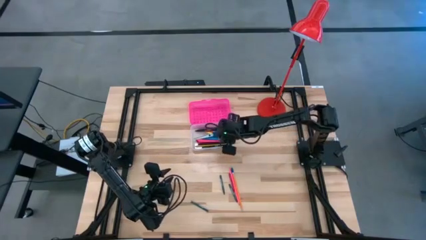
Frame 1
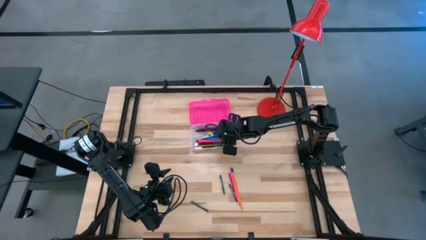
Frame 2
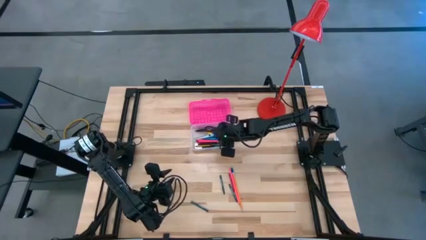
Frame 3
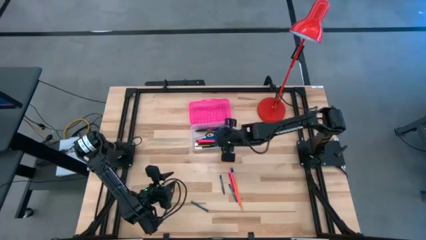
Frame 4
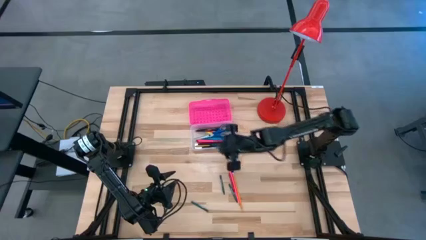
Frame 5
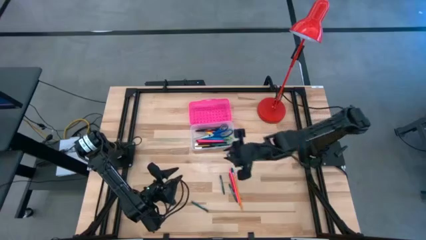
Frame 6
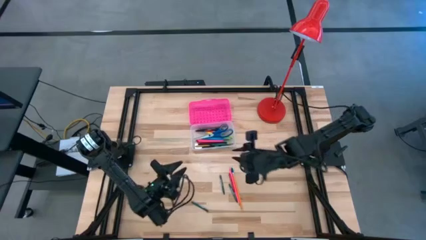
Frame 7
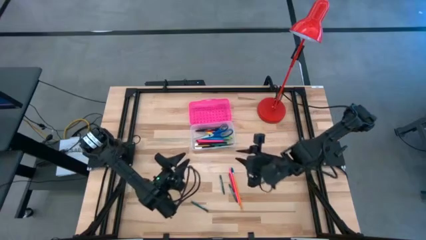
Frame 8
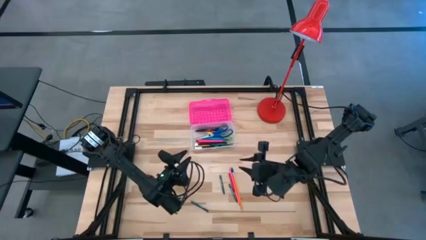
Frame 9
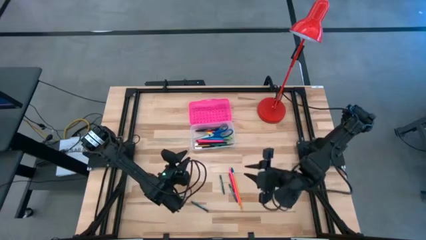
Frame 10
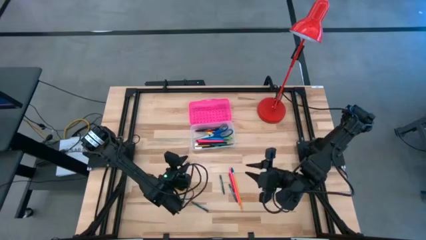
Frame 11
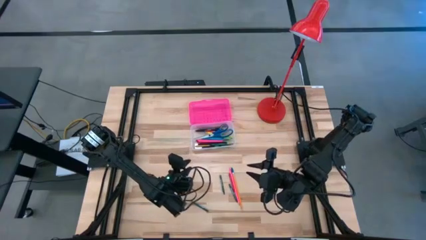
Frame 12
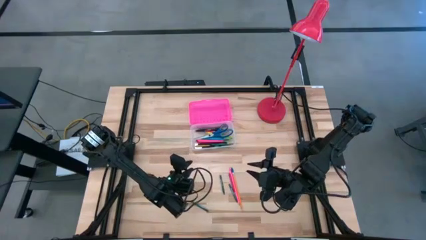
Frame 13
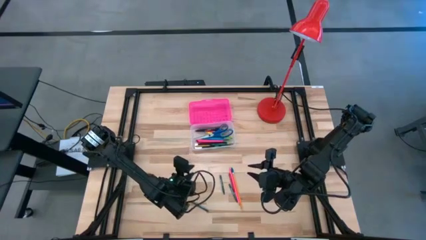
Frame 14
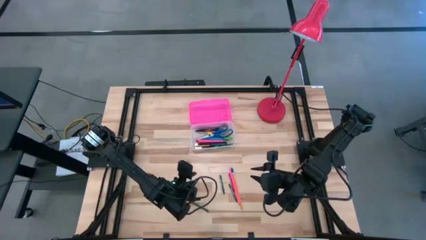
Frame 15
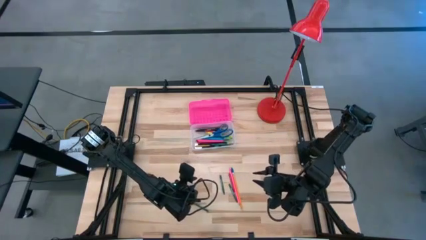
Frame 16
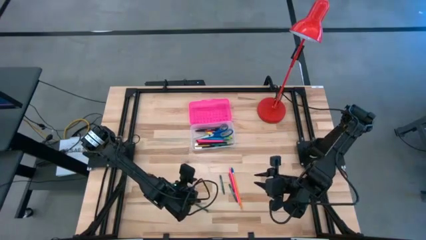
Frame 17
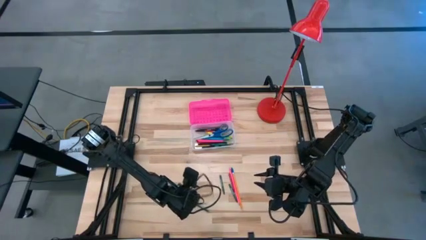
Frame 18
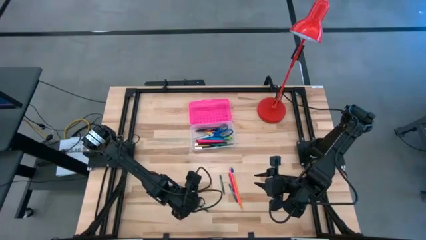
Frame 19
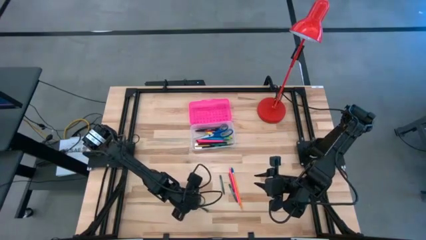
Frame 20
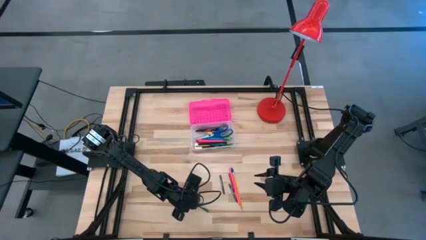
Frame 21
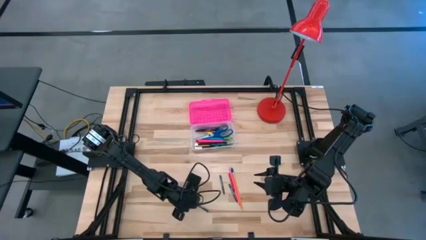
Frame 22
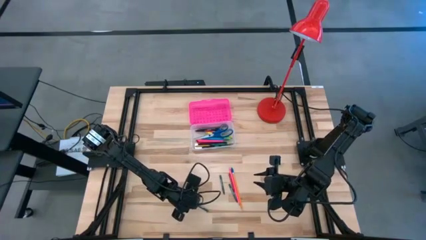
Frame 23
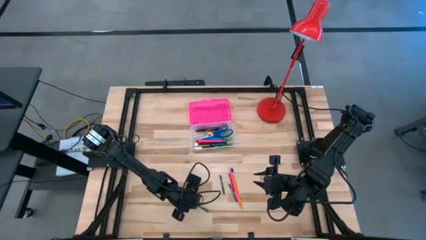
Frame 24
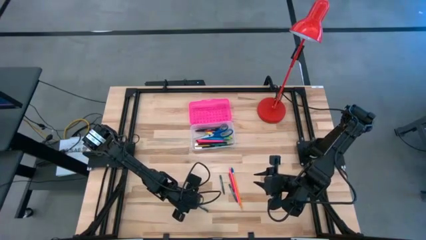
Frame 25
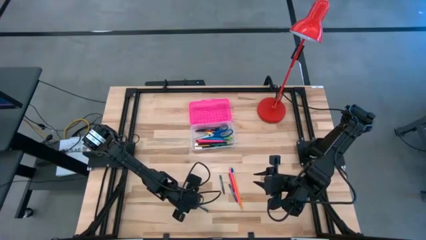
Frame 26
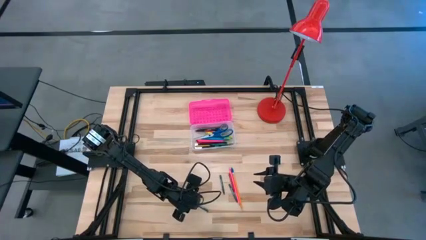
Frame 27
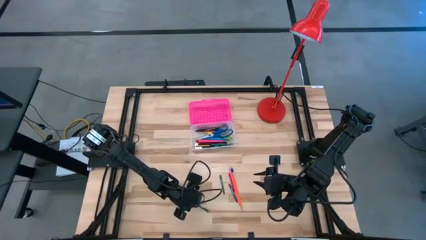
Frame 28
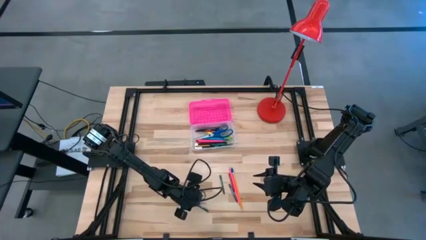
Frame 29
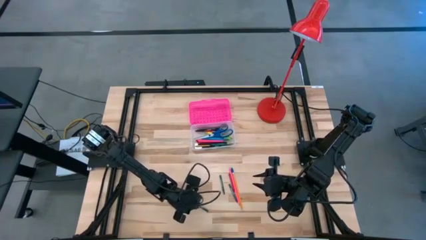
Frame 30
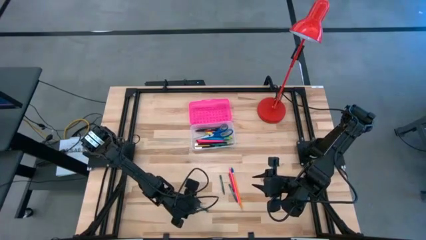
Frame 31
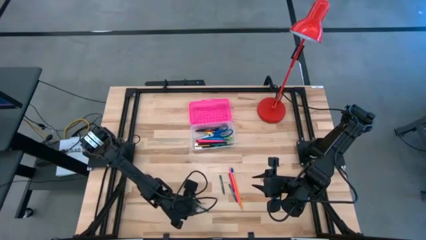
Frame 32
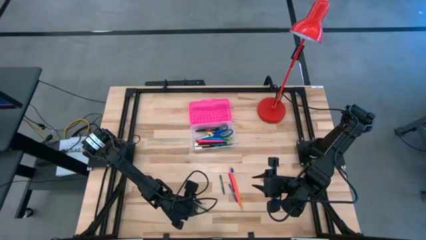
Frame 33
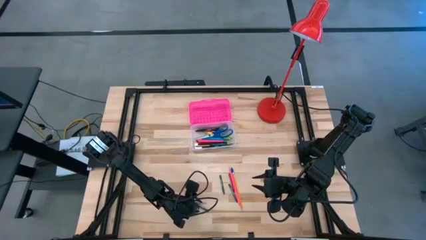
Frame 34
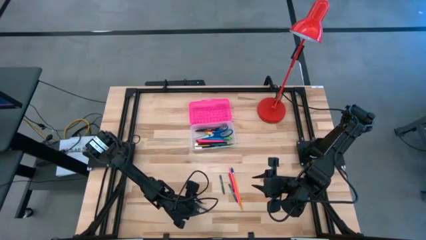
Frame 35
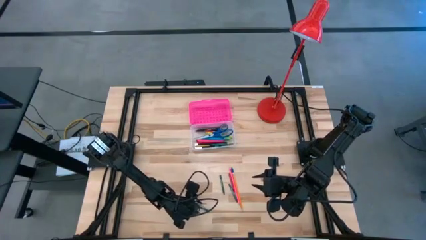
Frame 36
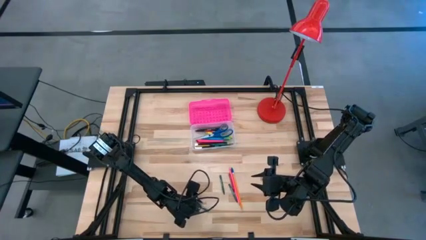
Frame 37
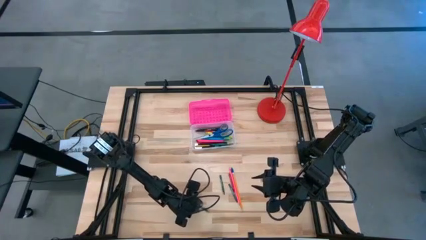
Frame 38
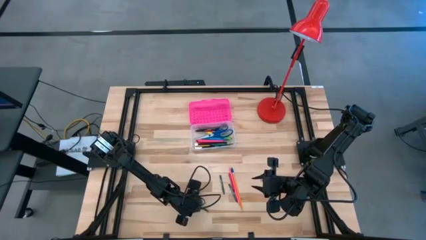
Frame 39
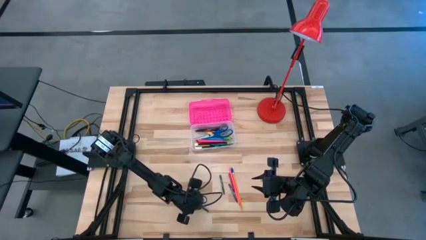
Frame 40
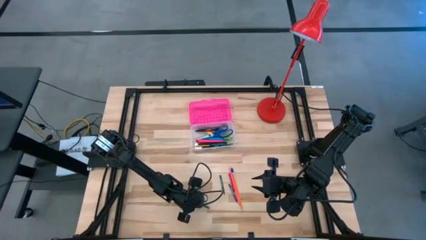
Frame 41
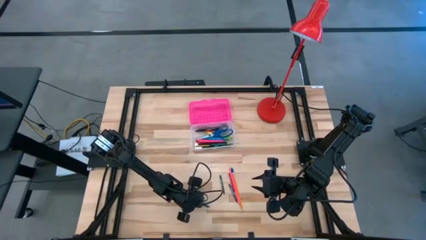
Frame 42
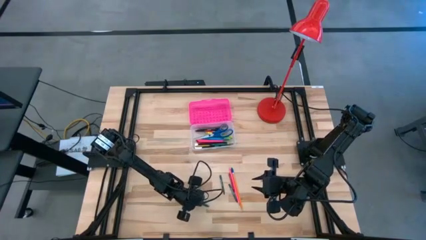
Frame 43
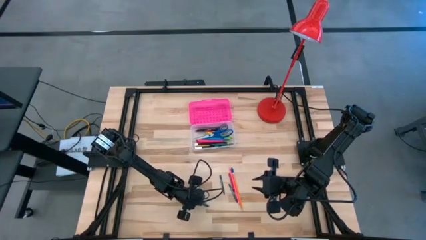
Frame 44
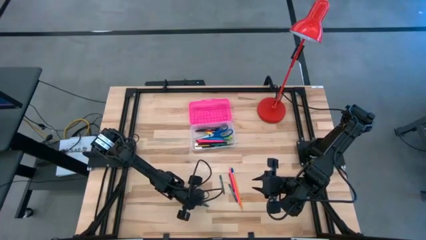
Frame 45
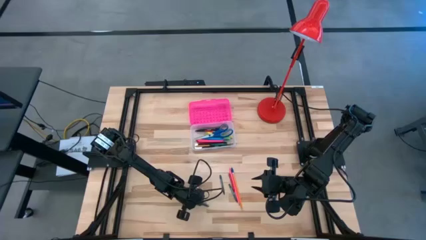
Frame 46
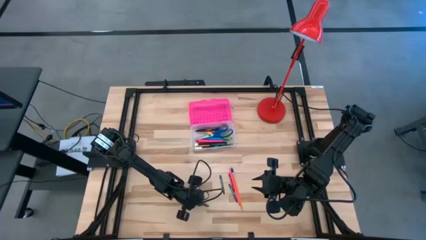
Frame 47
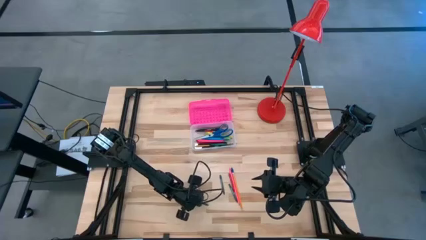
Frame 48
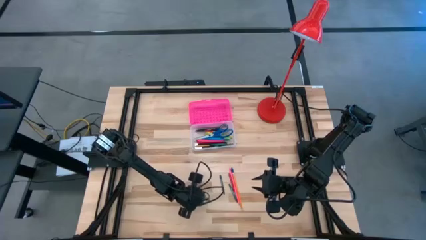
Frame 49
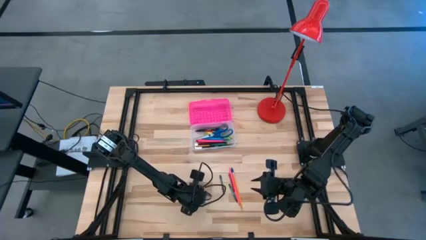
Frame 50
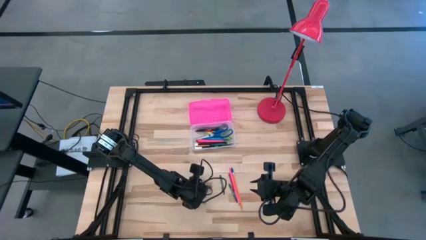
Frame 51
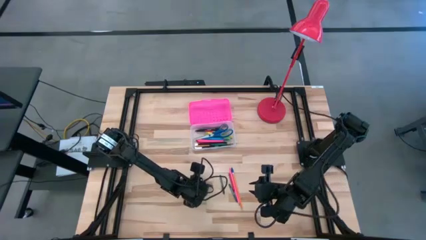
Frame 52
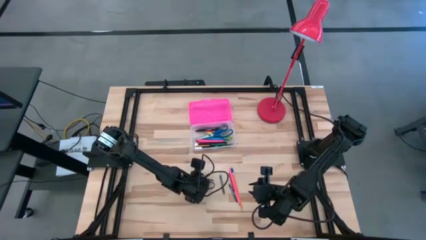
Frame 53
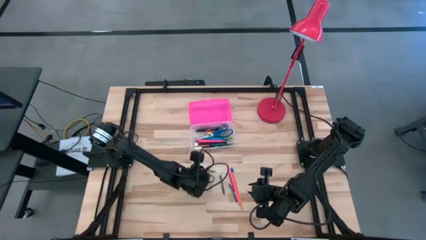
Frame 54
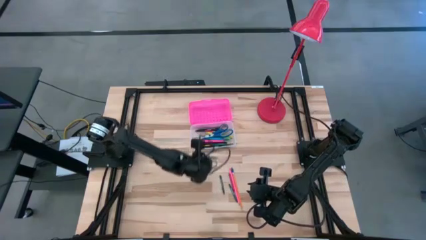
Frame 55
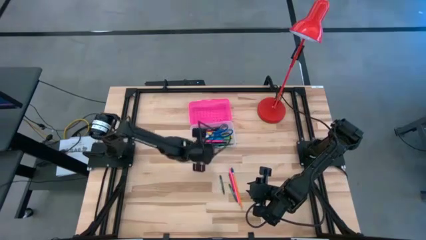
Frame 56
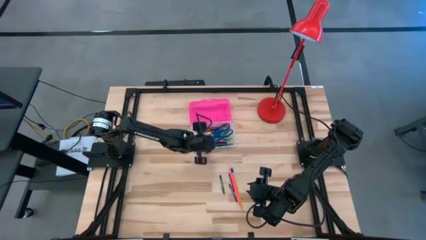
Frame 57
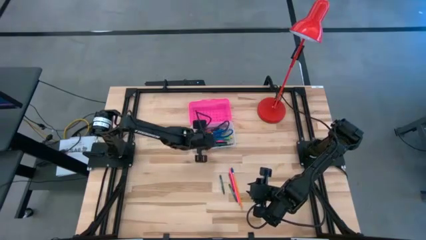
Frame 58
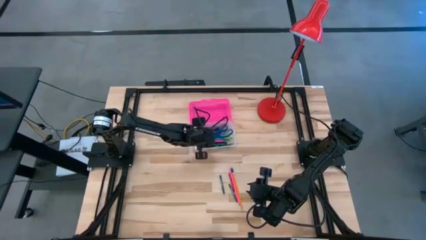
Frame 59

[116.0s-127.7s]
Task: Pick & place school supplies into a supply box
Put the green crayon into the pink supply box

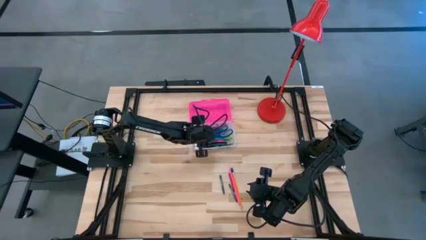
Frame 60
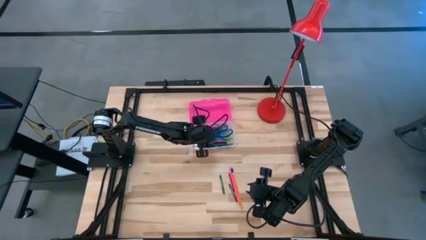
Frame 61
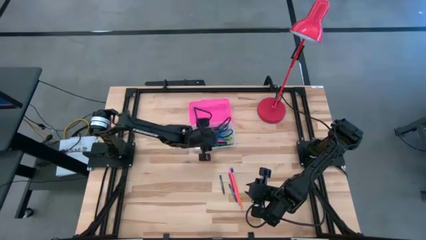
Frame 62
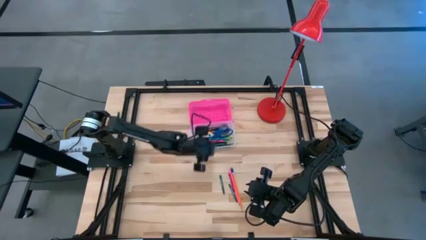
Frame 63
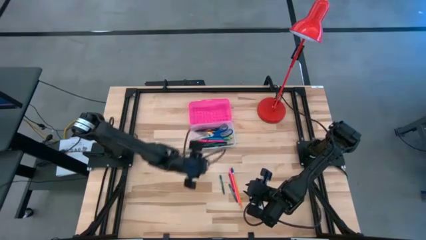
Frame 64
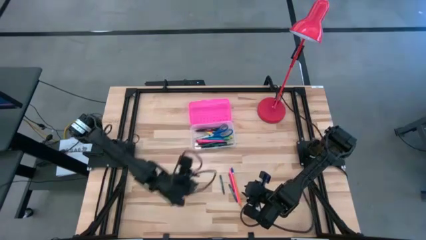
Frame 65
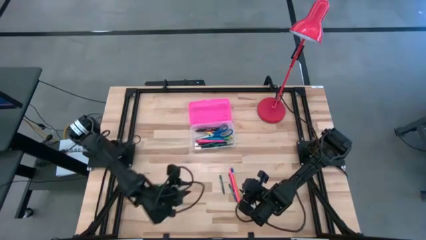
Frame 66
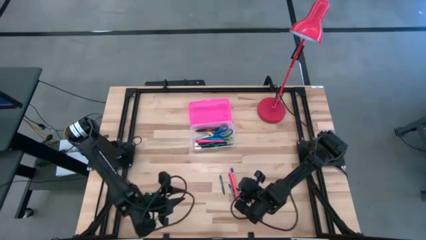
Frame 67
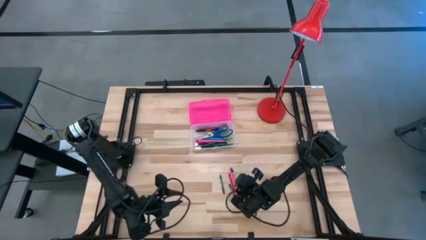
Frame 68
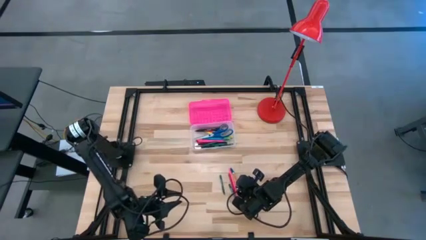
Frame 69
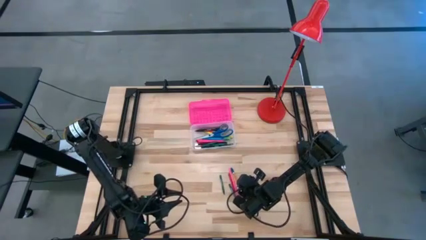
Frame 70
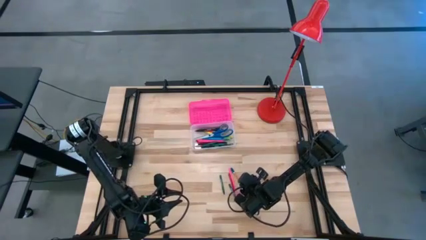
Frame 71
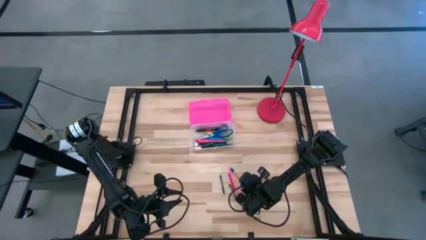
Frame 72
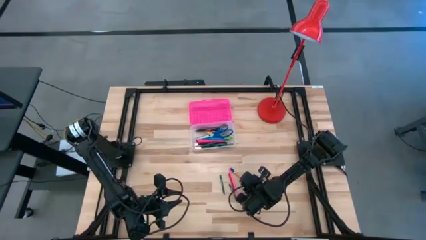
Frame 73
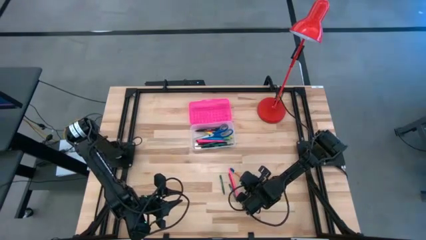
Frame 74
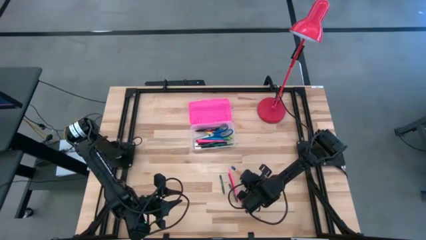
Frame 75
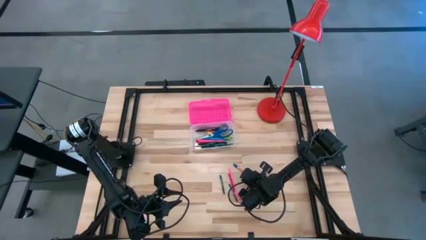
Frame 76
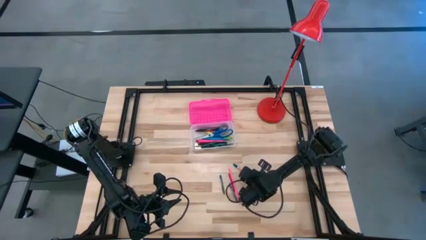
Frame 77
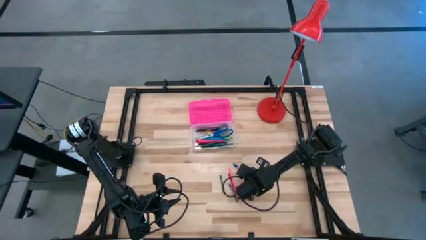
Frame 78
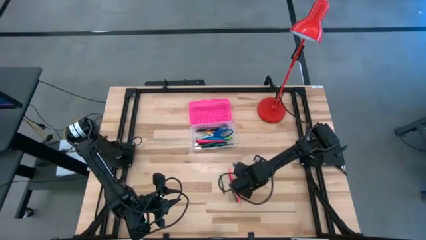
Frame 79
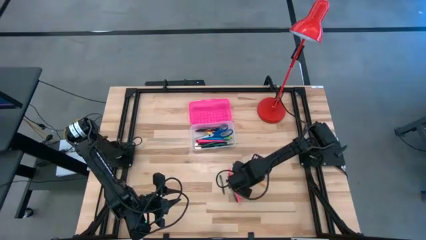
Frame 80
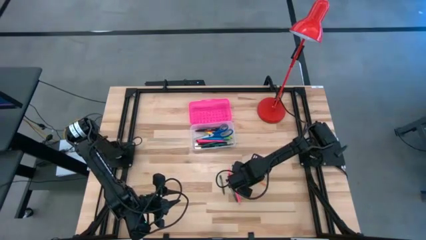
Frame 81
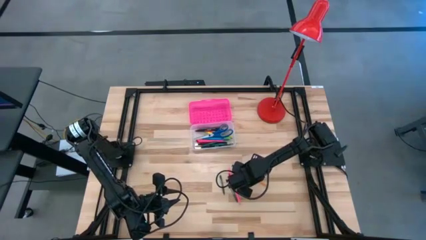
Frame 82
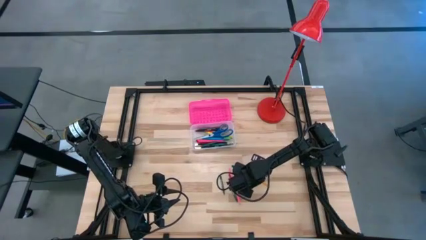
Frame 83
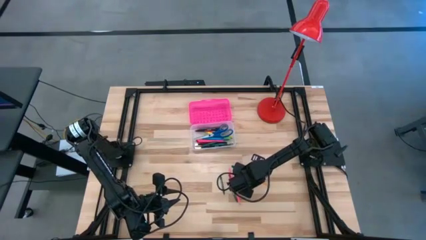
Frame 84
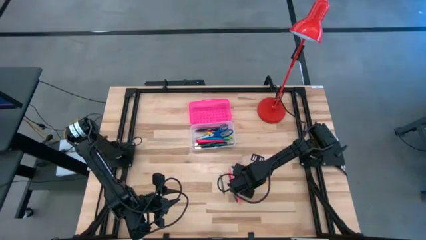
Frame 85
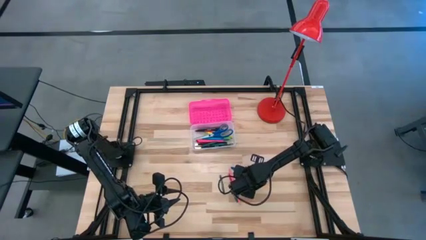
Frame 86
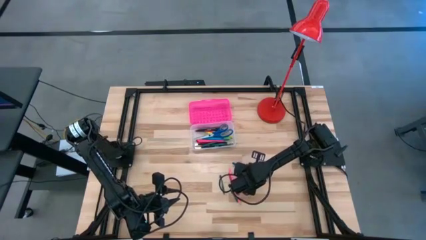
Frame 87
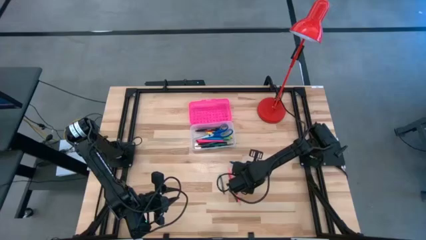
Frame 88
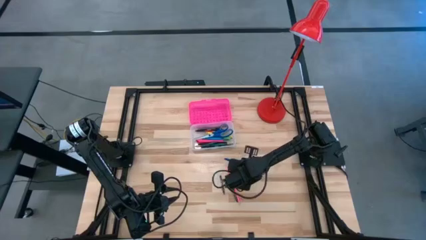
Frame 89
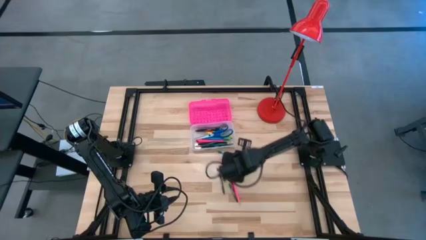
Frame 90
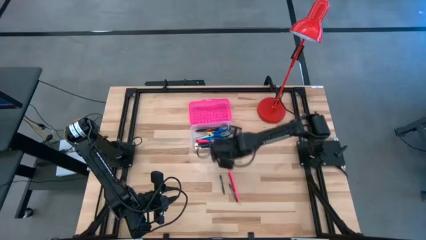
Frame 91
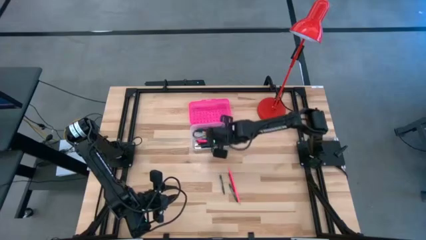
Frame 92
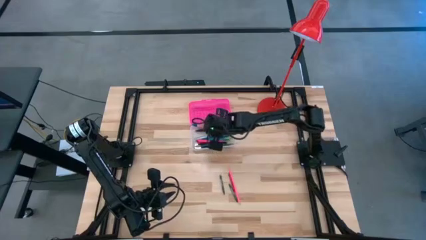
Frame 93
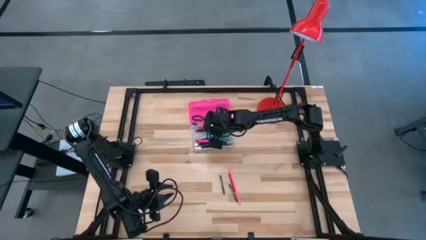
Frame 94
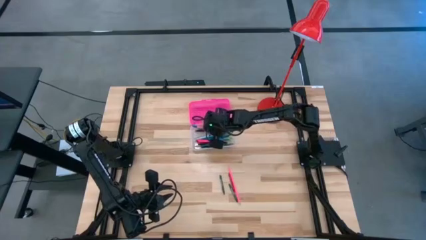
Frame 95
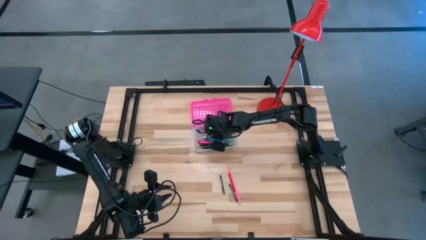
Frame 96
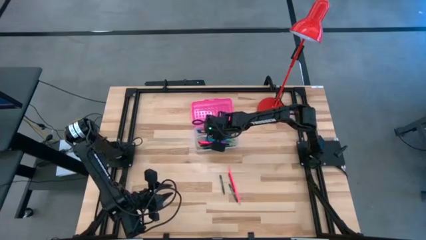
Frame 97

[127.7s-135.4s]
Put the orange pencil into the pink supply box
